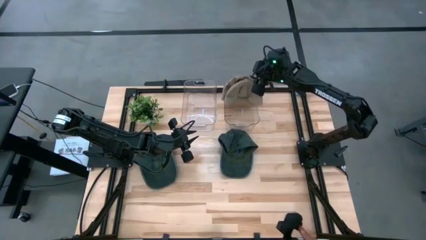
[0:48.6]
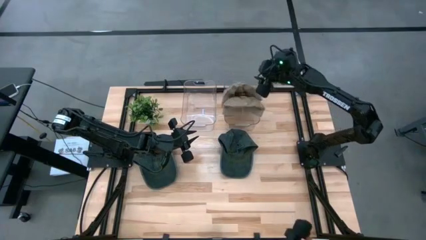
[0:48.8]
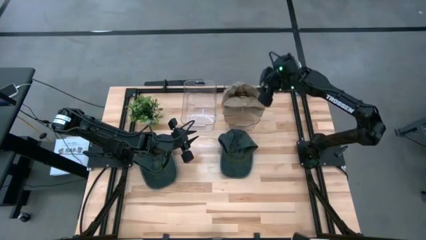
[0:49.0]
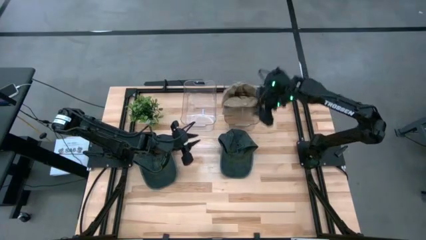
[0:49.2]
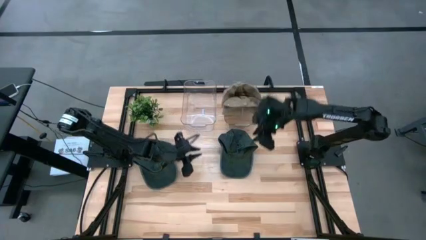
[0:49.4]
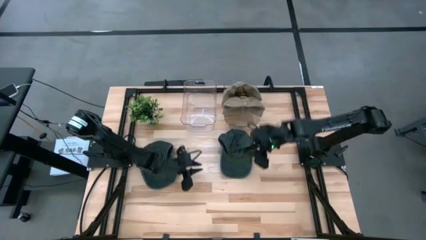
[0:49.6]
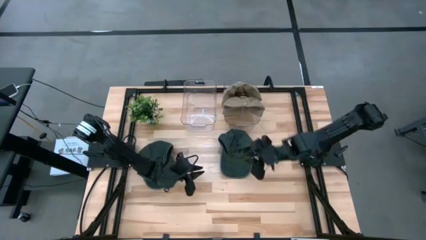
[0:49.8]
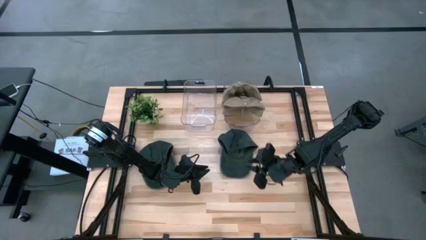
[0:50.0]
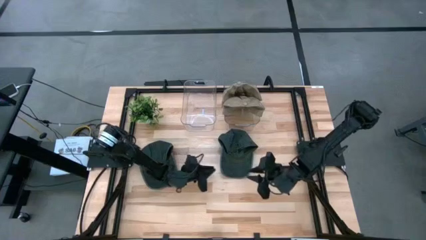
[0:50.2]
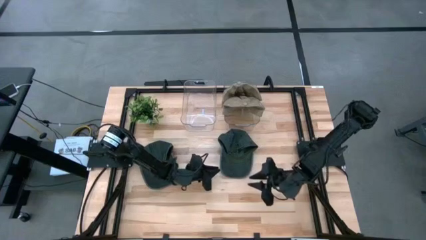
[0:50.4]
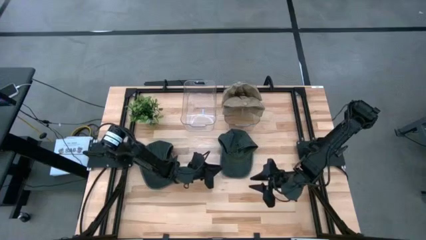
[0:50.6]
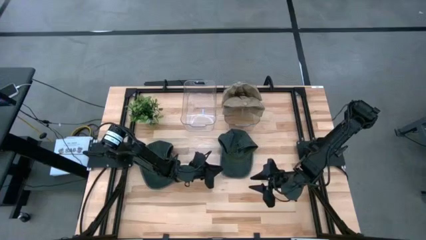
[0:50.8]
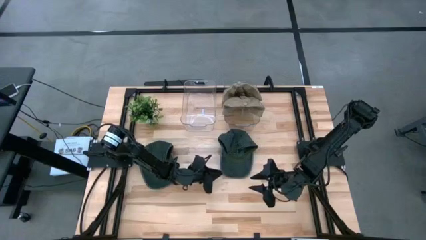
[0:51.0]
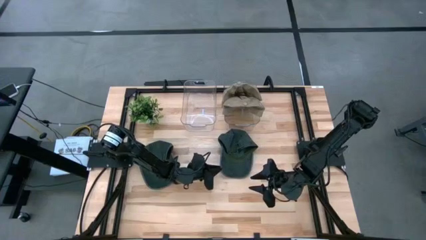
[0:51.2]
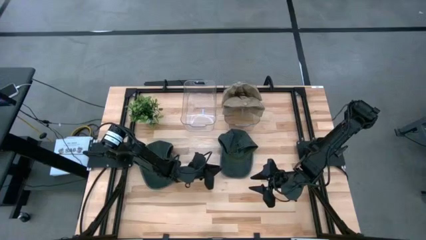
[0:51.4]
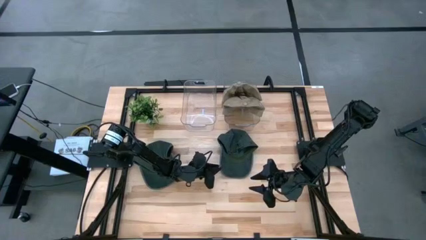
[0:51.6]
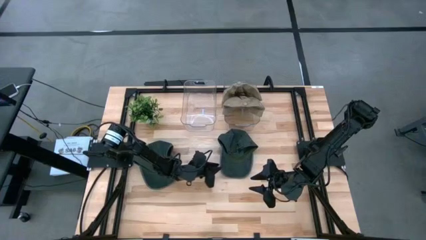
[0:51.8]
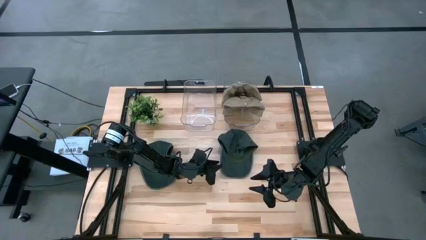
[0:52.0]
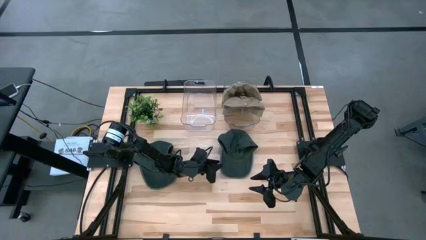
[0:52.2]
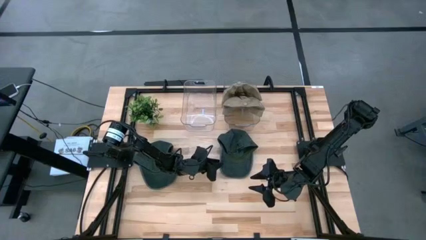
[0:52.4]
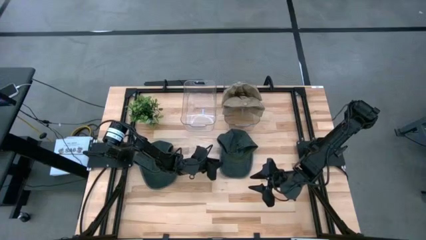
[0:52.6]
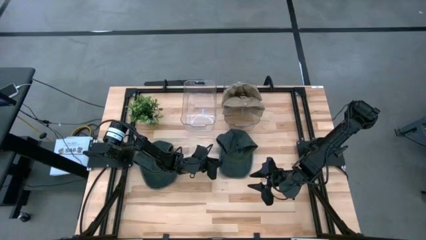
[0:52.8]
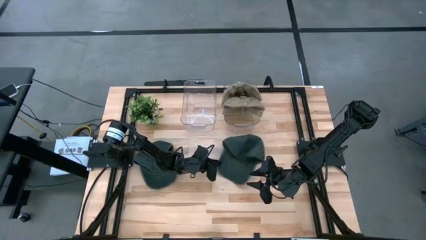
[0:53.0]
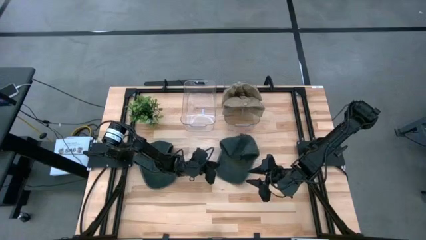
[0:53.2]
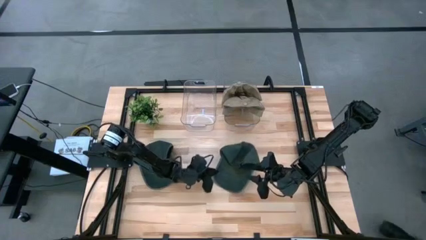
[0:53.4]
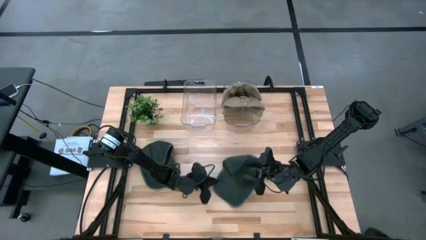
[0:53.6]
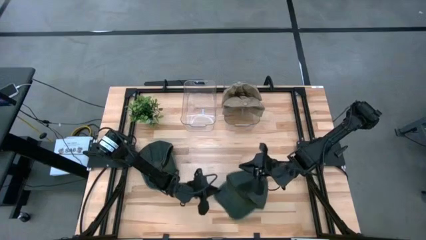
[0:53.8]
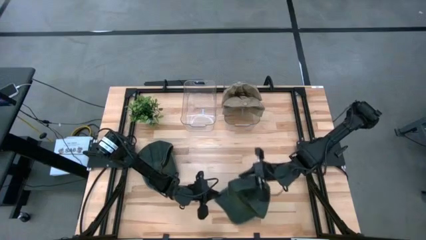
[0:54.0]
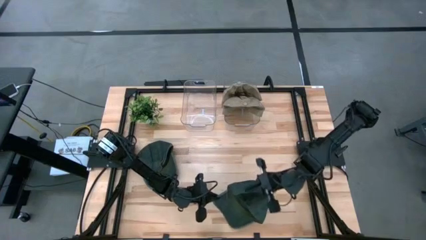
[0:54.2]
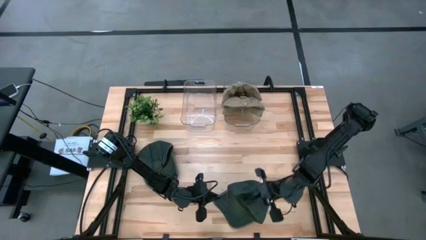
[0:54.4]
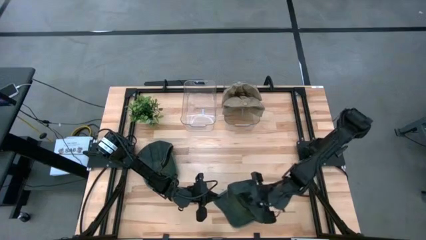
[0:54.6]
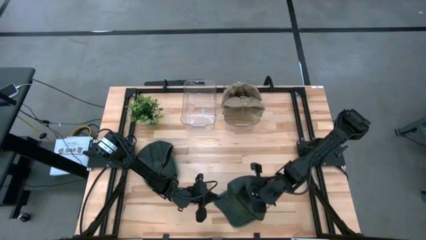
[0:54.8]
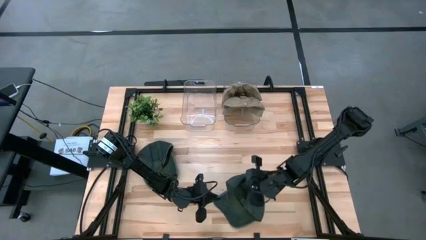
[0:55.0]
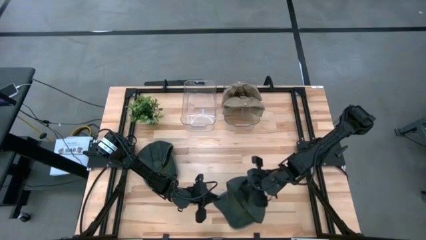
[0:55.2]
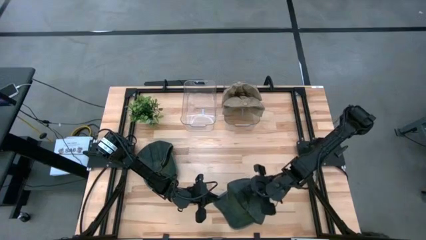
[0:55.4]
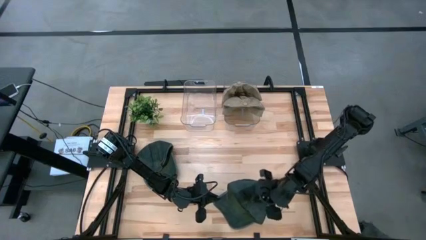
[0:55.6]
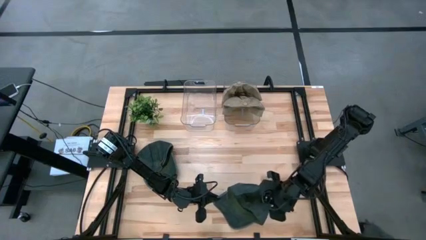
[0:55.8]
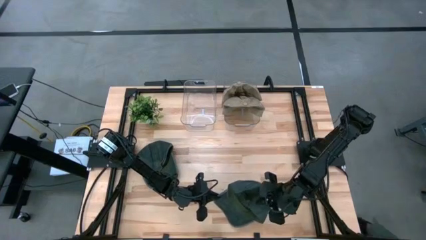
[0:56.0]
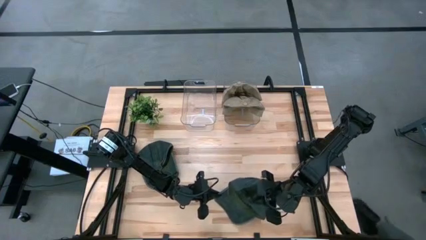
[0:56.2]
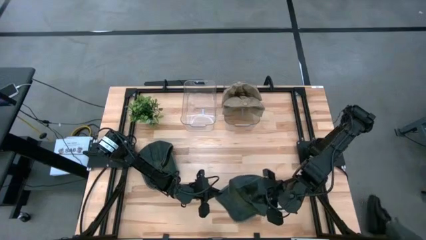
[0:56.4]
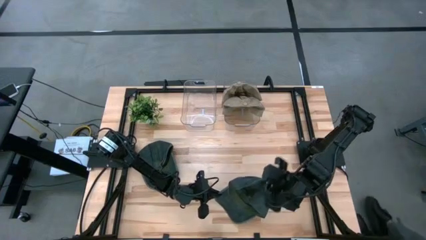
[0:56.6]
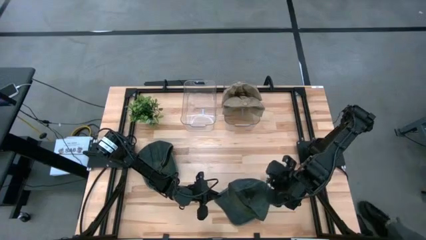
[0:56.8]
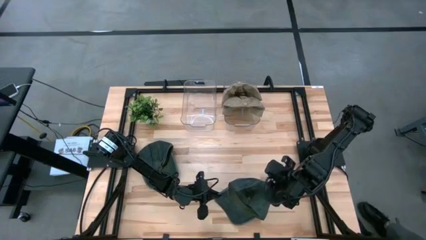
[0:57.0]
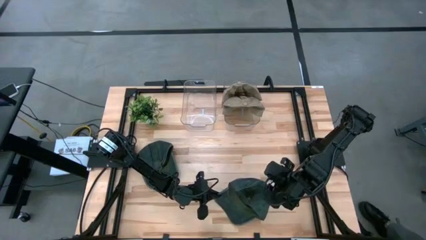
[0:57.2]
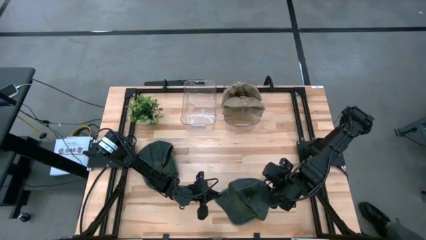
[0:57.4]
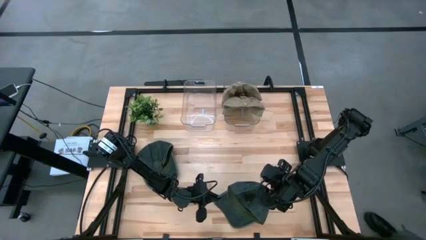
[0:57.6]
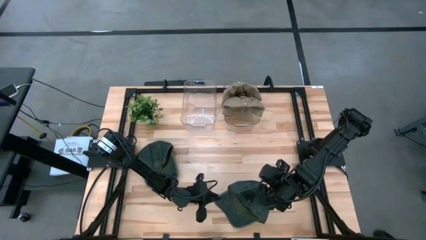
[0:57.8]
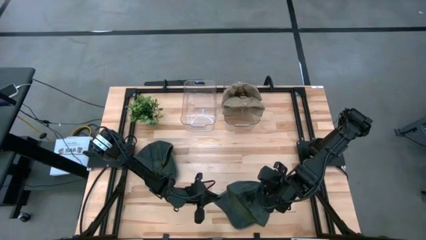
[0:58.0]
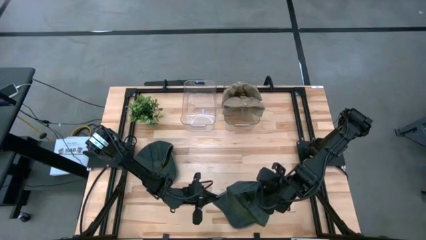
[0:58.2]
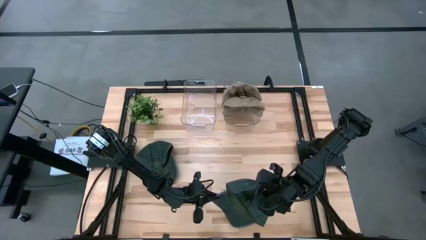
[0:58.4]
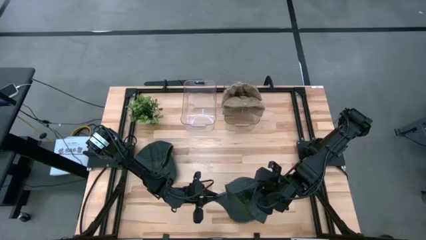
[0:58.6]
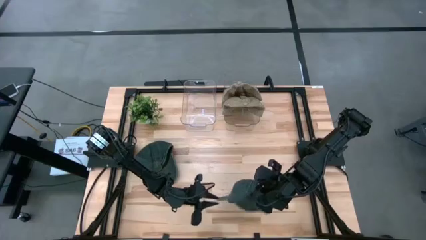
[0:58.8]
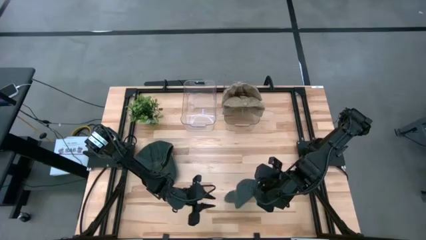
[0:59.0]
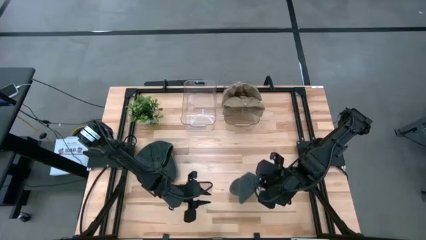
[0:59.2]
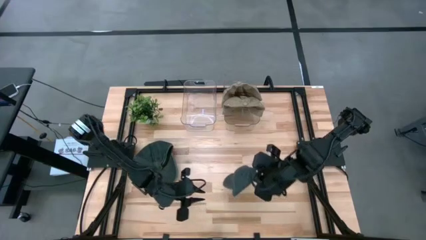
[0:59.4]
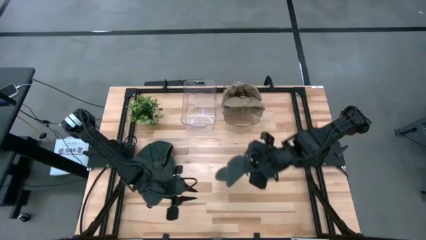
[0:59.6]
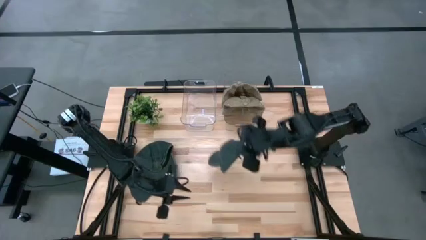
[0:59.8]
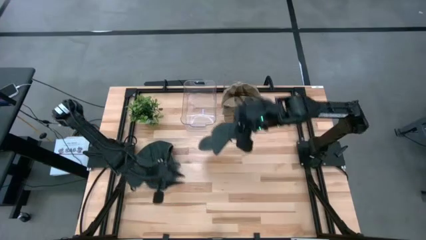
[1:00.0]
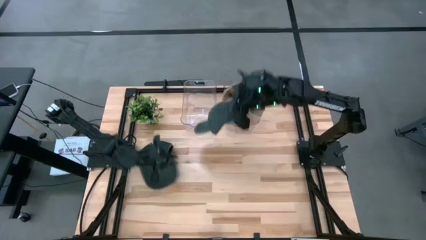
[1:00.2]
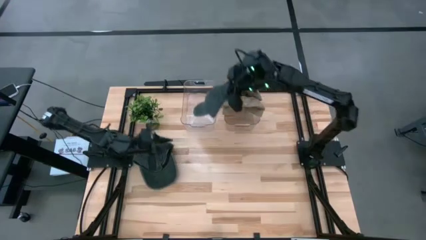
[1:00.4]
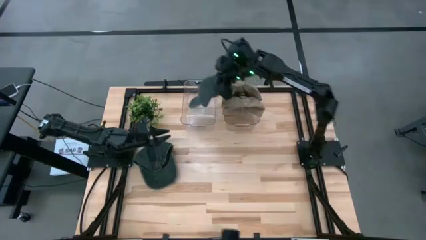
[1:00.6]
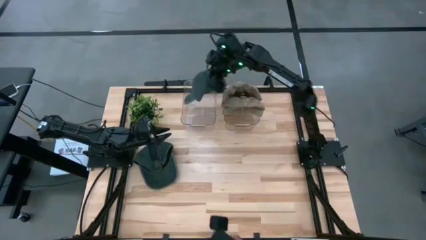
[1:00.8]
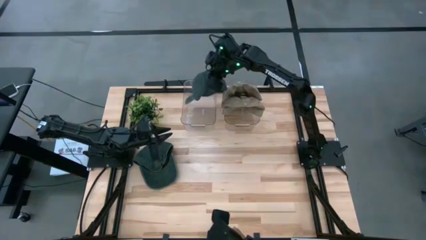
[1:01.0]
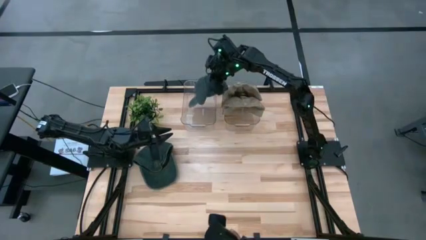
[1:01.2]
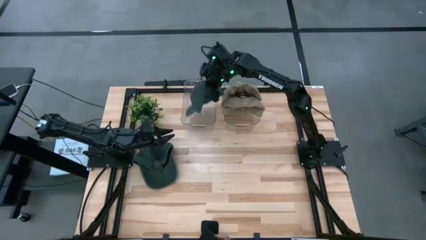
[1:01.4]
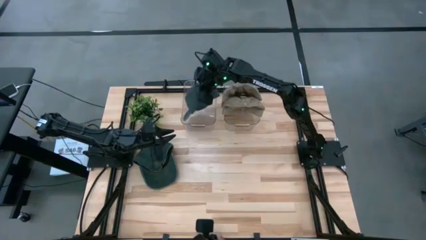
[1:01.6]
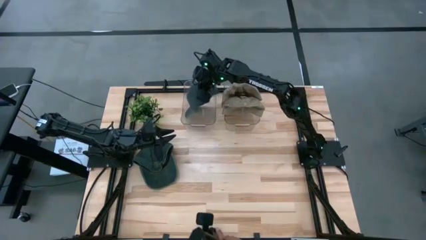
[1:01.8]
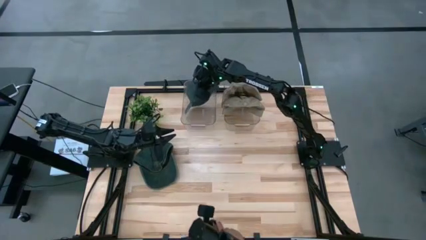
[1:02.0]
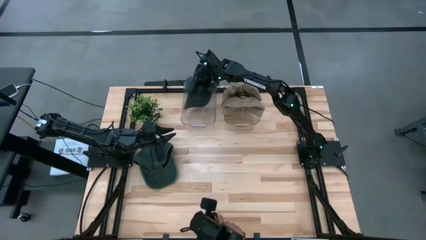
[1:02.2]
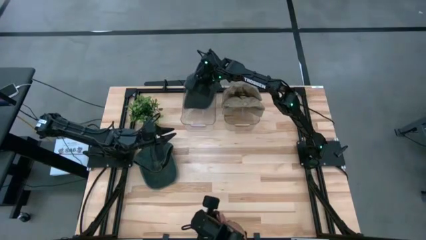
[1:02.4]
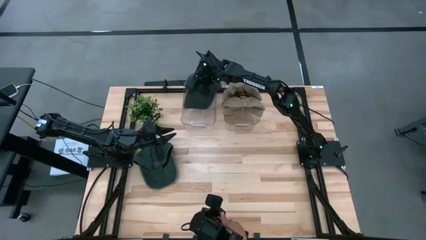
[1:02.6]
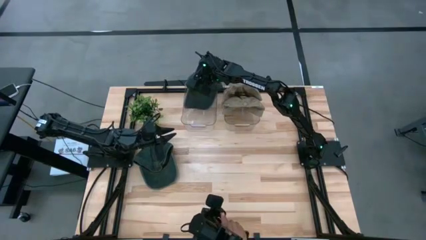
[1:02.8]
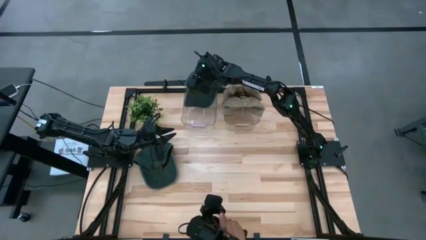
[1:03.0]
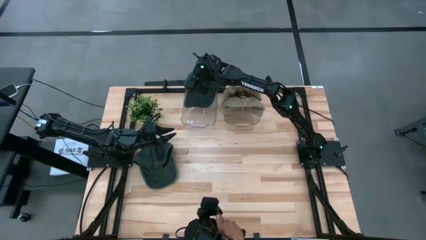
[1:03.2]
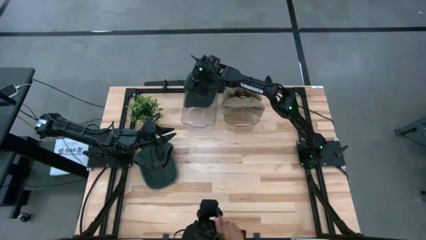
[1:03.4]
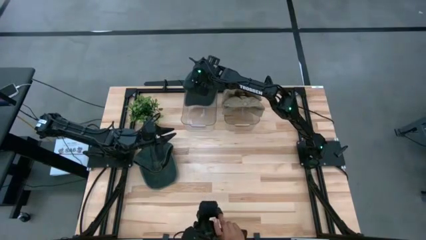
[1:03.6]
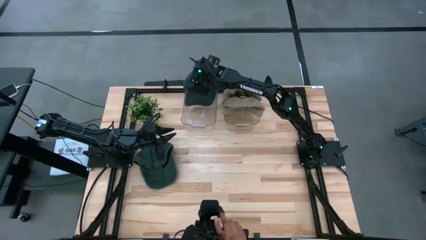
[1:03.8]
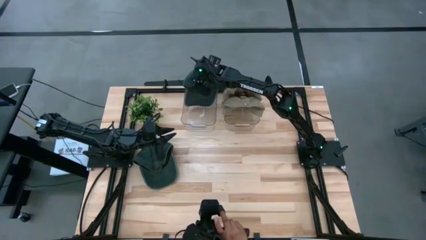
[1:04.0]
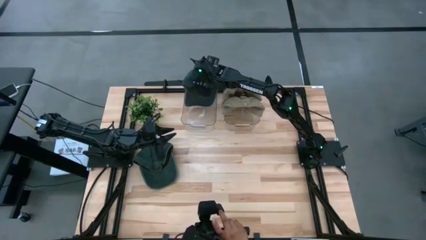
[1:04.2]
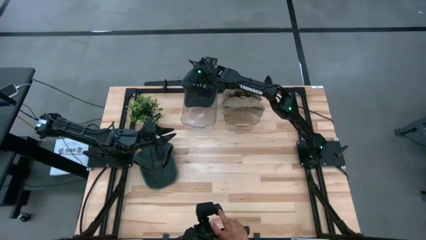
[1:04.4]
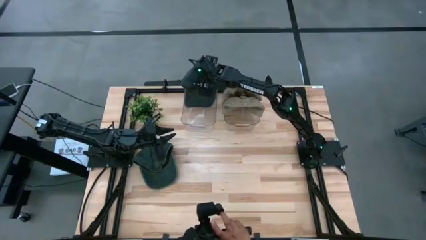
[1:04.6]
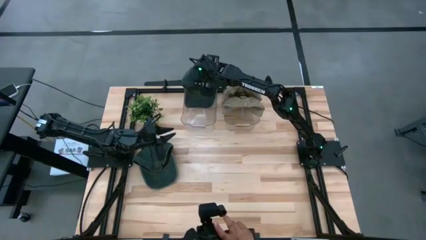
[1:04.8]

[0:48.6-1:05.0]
Task: Pick & Place hat
Put the right blue cap into the left transparent bin
